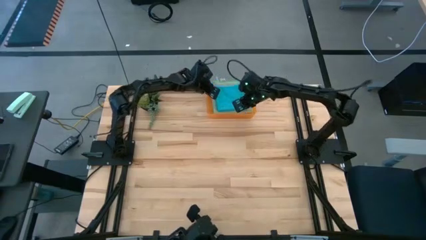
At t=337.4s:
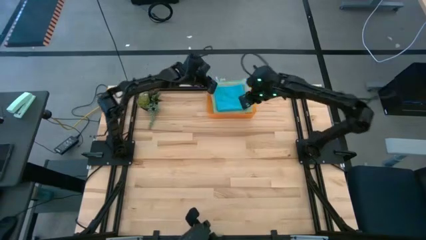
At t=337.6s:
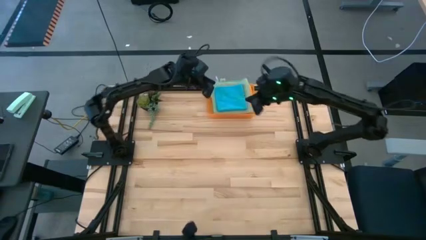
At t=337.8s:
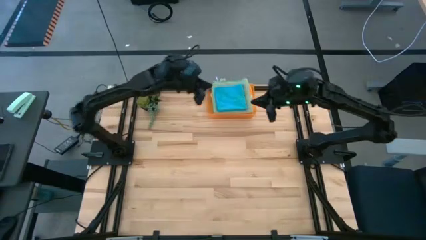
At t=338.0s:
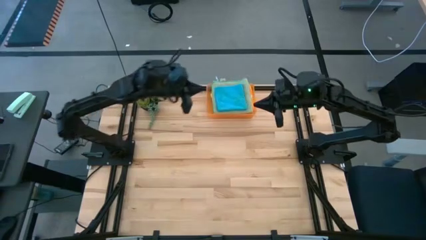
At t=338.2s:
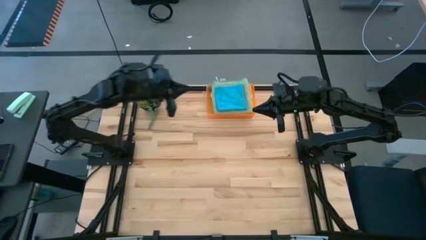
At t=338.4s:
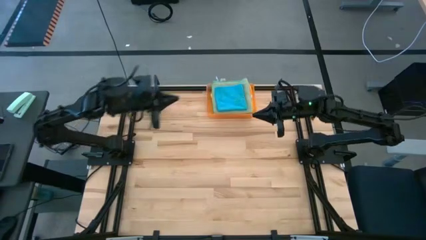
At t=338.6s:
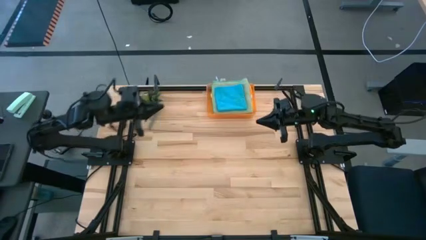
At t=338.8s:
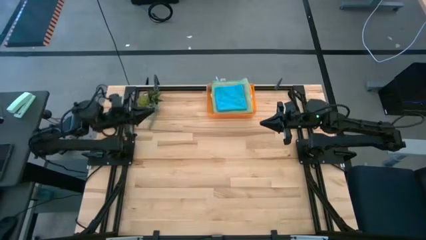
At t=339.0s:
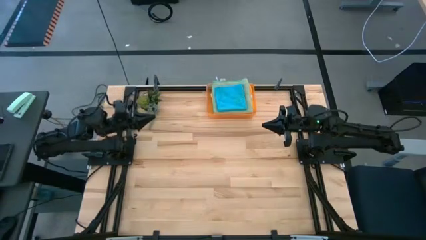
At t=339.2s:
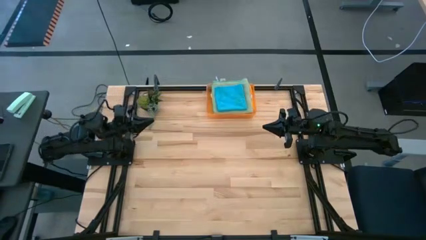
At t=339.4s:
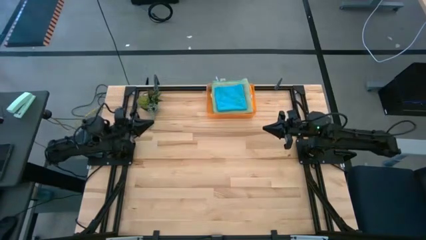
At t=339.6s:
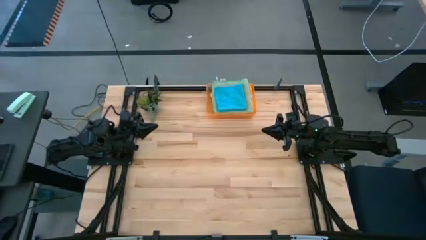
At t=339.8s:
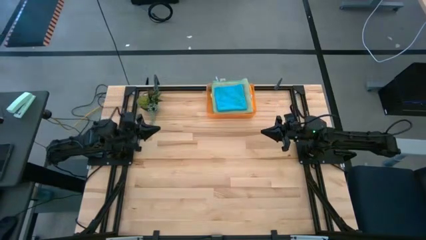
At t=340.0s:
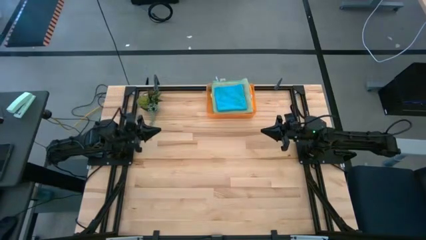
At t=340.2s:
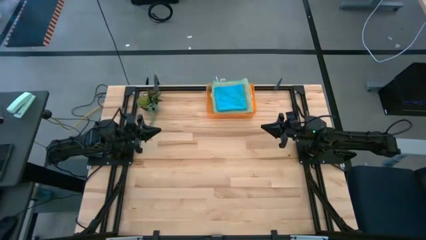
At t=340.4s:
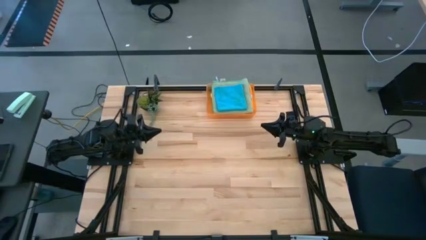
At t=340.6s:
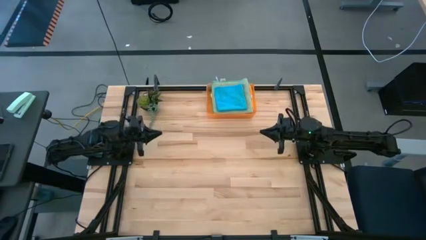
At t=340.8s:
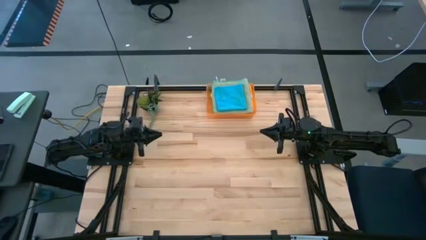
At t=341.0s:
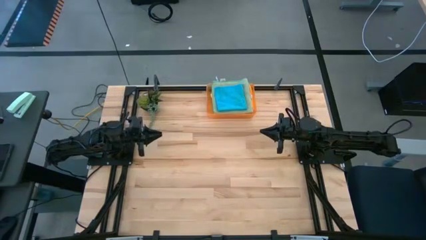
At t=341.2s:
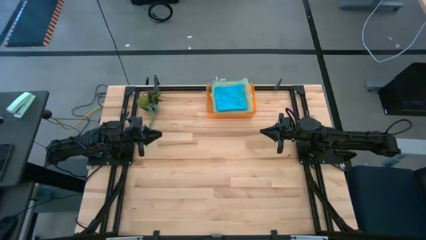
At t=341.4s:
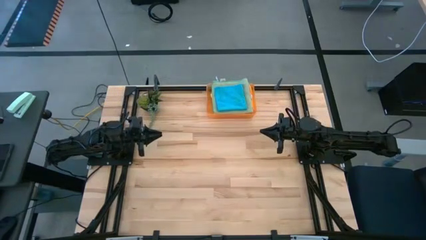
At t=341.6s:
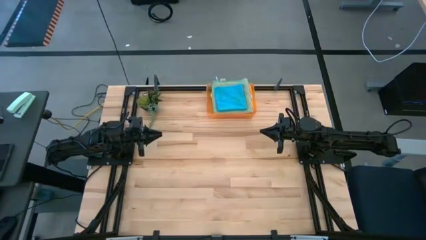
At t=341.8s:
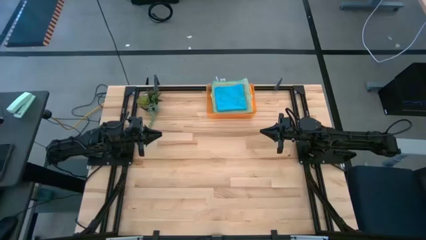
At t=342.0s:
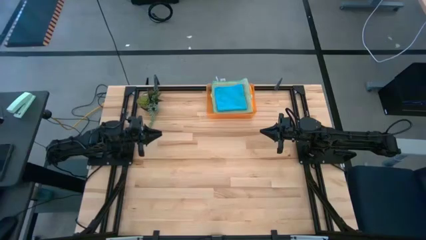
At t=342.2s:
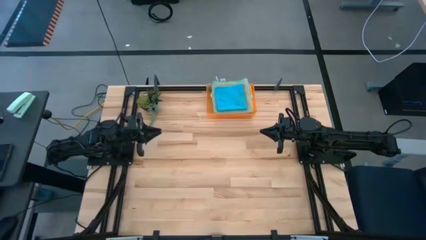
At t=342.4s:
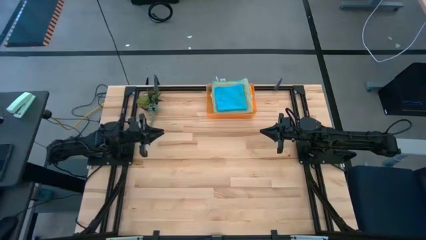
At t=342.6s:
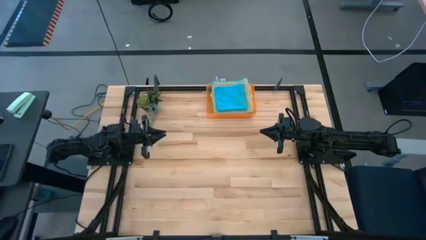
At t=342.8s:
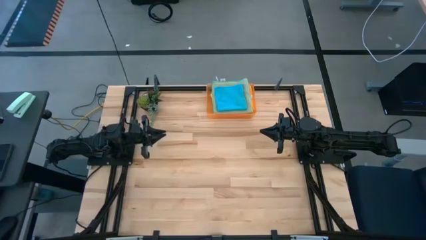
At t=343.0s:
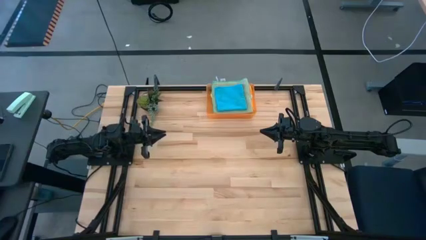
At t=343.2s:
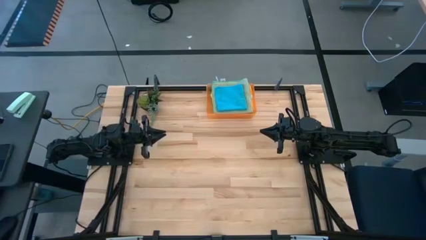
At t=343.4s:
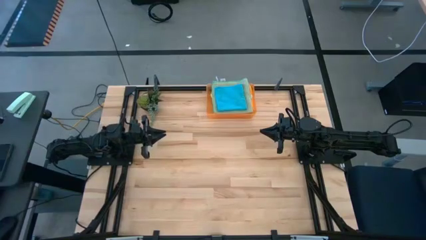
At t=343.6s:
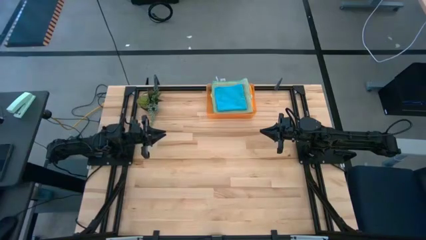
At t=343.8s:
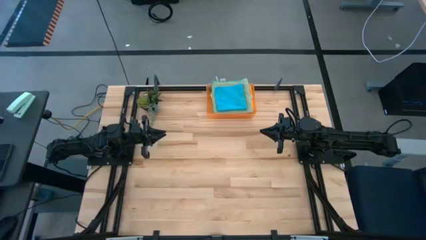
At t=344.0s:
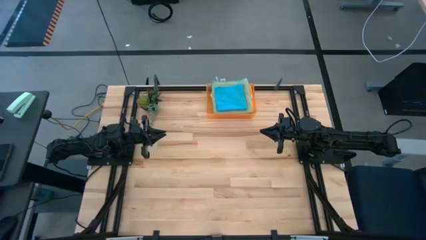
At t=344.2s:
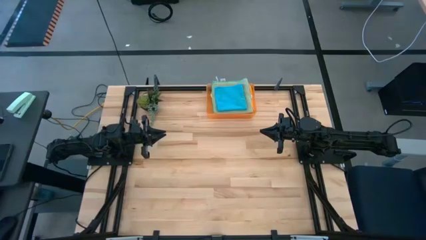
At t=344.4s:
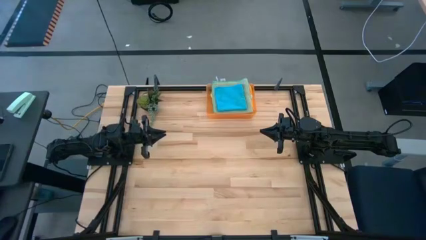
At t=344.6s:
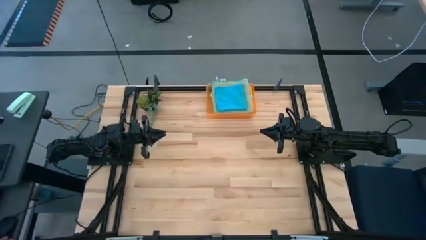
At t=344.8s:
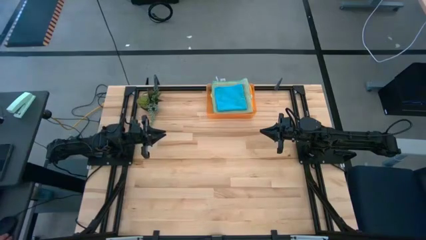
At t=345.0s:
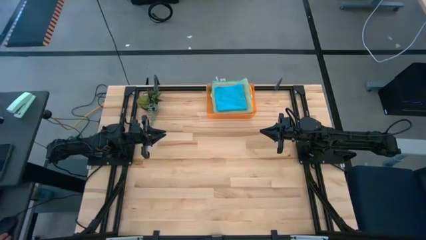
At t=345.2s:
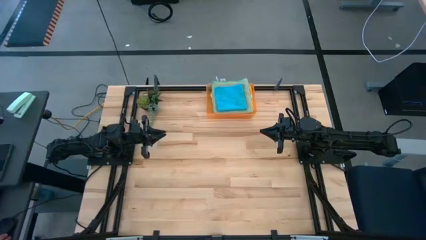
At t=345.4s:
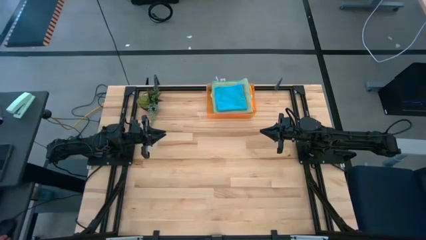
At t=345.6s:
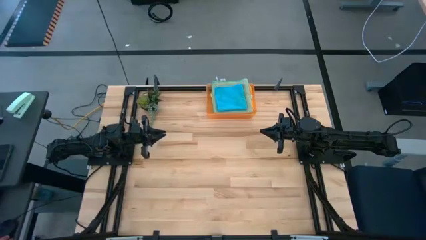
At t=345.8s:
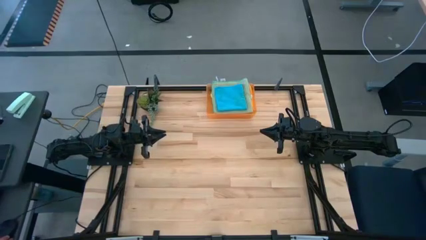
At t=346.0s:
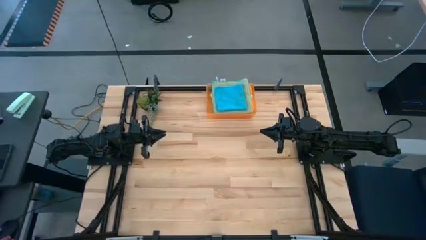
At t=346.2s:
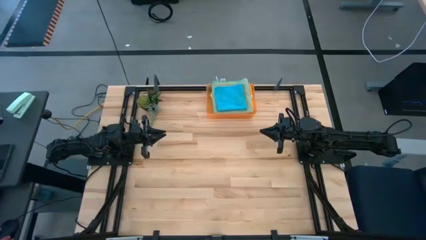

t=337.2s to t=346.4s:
Task: Fold microfiber towels
Return to Home Position

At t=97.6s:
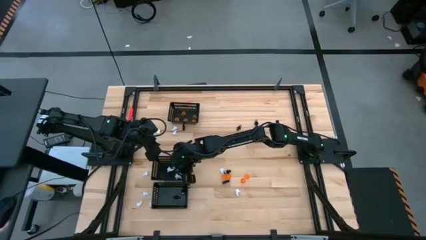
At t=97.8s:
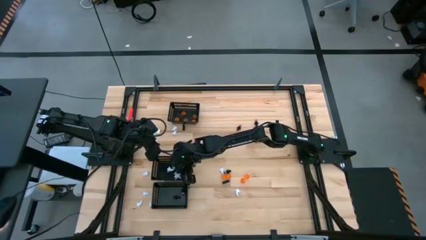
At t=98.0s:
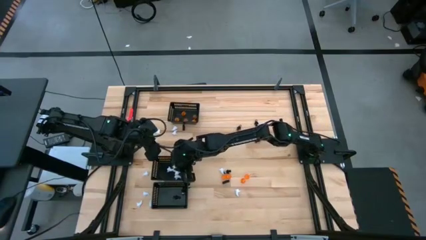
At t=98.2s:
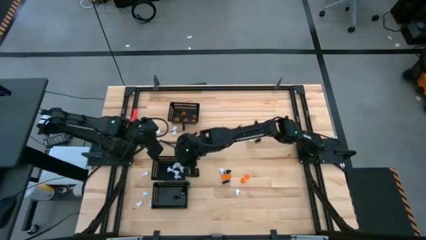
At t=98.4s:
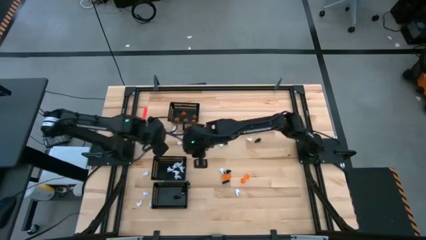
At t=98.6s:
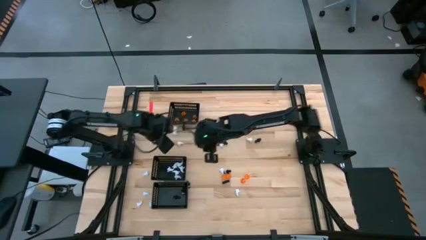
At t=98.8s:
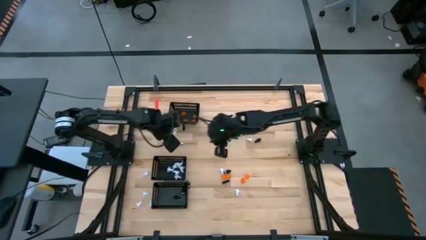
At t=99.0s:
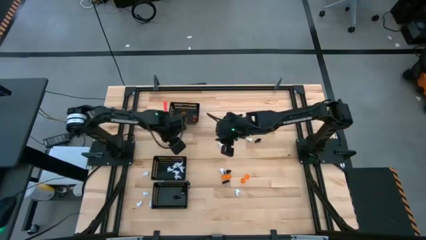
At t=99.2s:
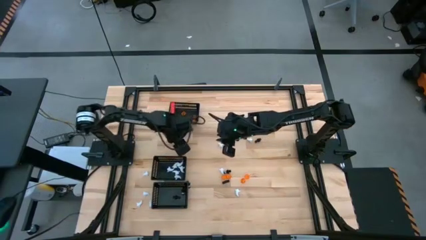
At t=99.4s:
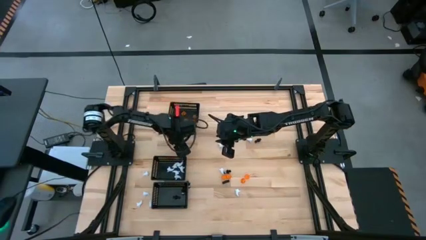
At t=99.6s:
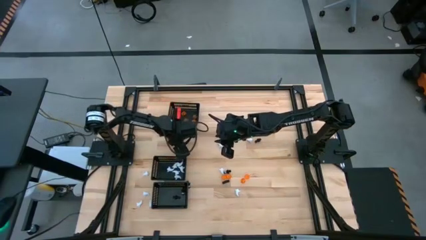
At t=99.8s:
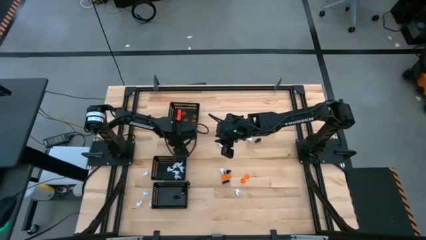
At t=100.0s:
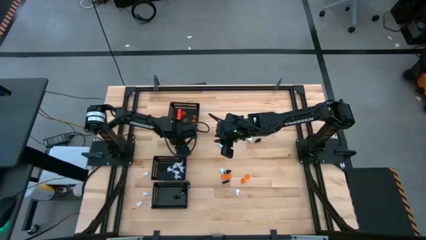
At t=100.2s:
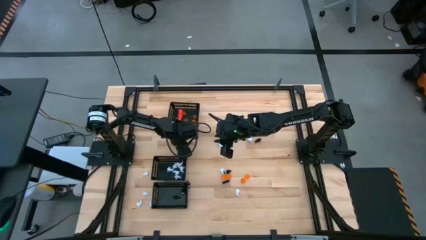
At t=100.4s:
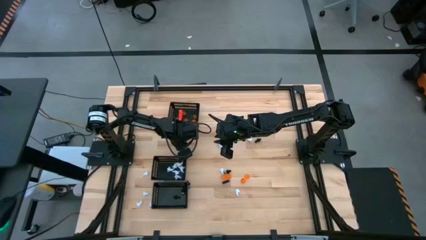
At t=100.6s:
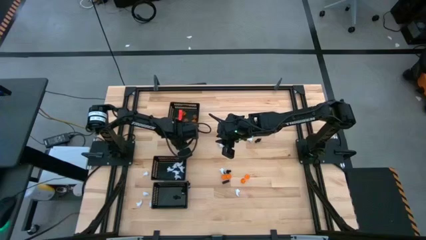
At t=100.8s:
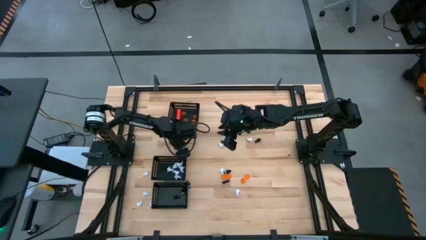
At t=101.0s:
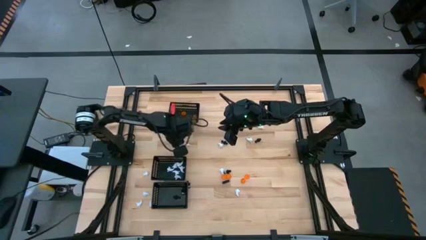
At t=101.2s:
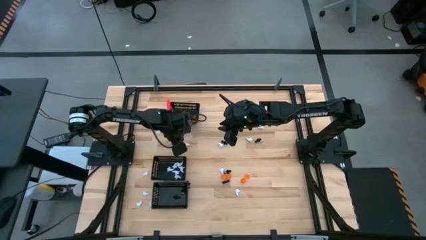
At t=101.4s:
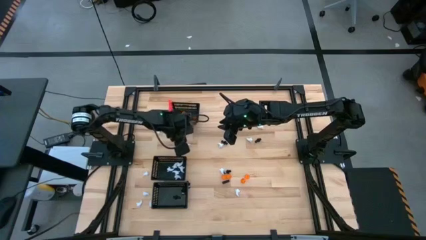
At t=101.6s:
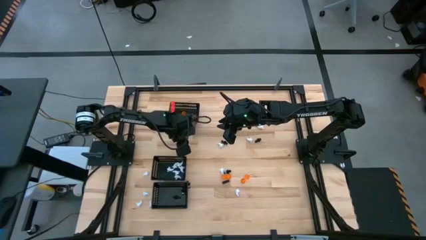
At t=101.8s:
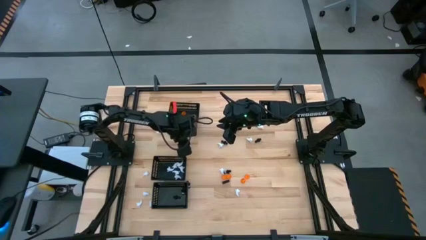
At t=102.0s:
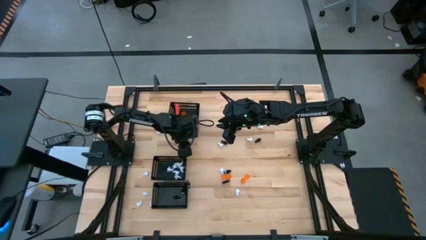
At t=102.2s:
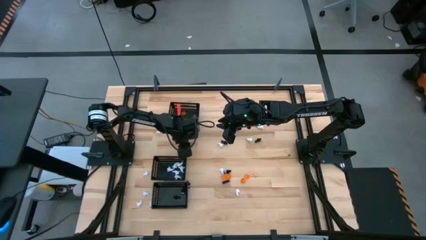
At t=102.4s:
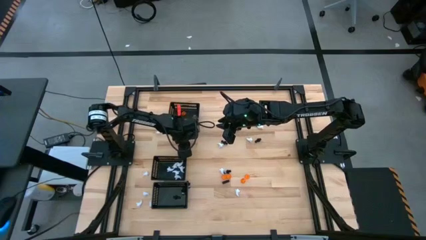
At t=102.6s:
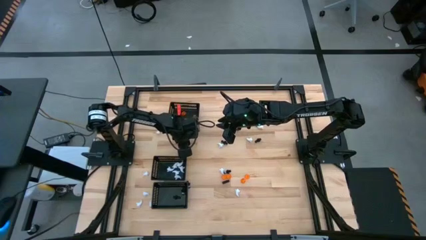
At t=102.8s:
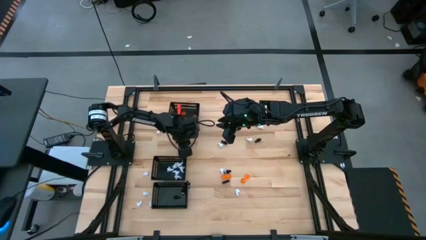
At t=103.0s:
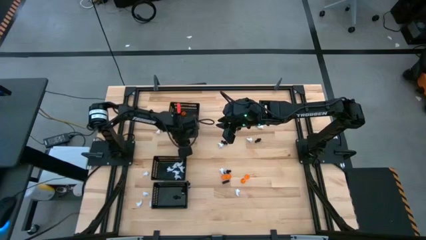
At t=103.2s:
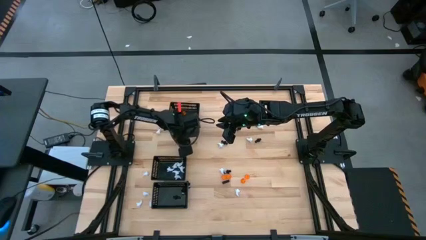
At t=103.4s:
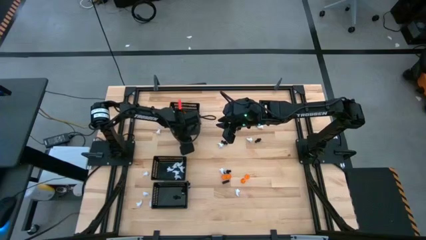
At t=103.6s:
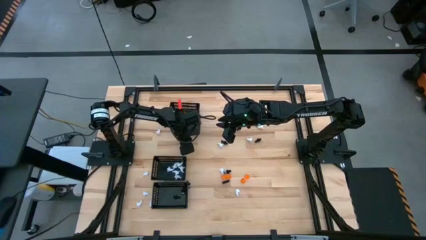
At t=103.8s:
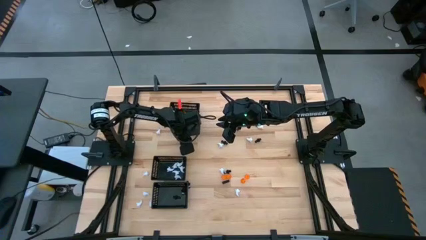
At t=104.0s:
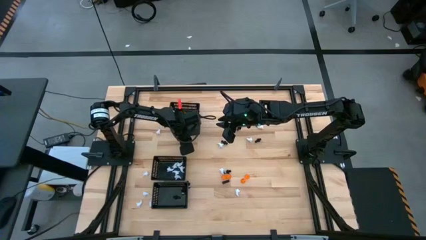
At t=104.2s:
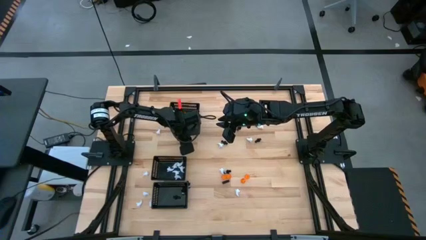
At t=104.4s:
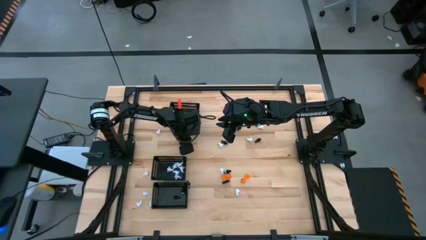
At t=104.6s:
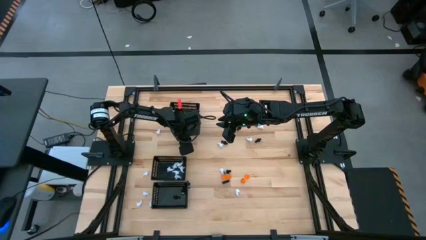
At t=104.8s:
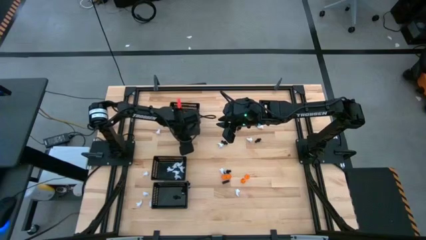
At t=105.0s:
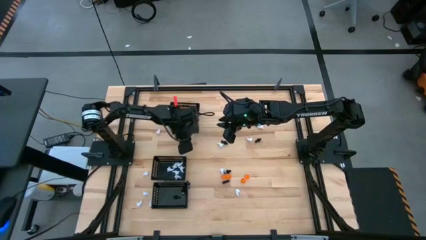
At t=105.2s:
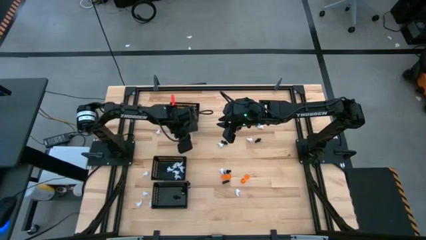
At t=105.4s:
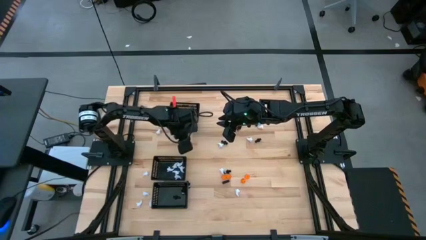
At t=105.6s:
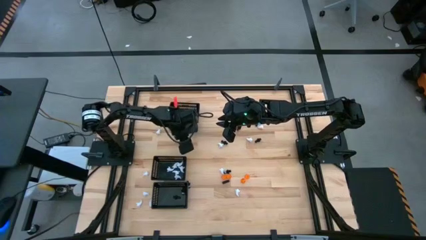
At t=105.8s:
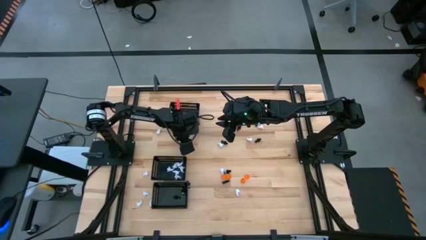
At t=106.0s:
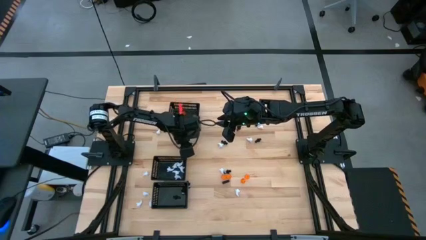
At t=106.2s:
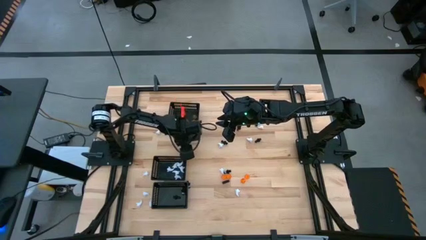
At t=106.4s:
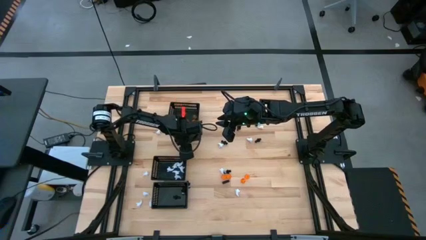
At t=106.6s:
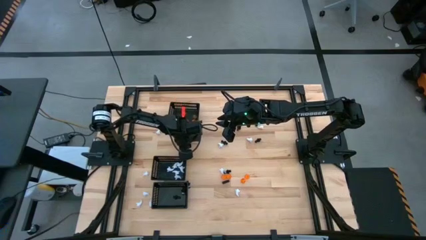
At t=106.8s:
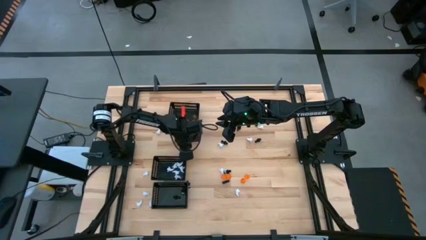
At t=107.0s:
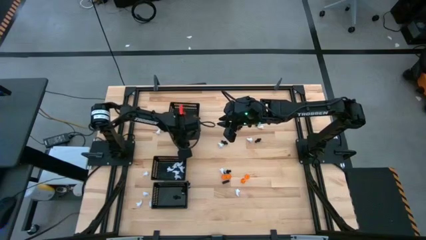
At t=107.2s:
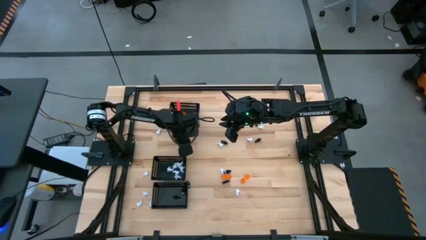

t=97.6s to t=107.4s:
Task: Sort Halloween decoration
Put the white toy into the middle black bin
